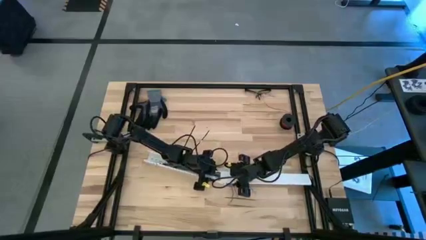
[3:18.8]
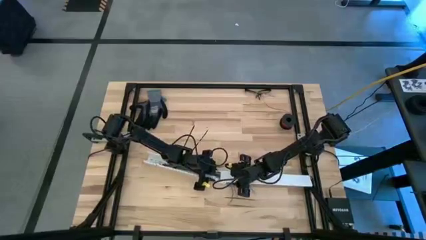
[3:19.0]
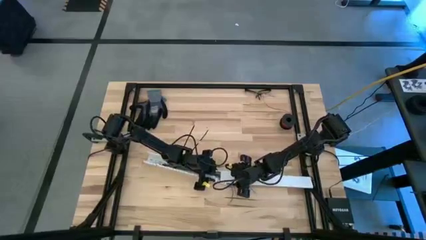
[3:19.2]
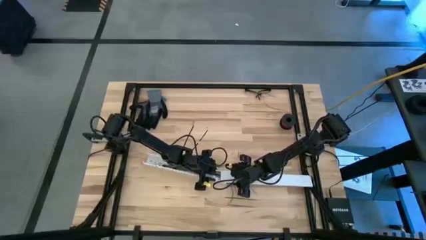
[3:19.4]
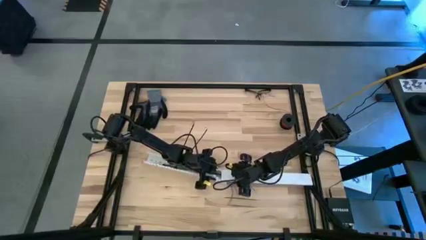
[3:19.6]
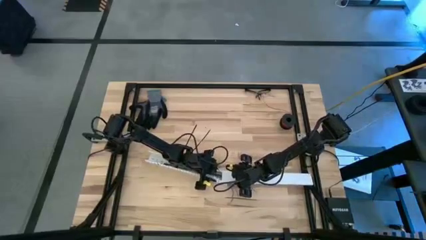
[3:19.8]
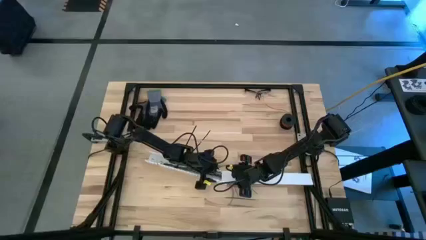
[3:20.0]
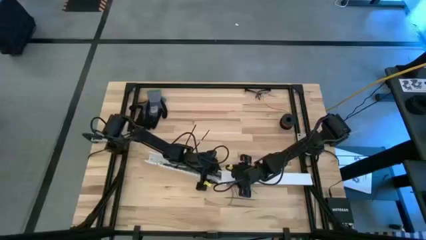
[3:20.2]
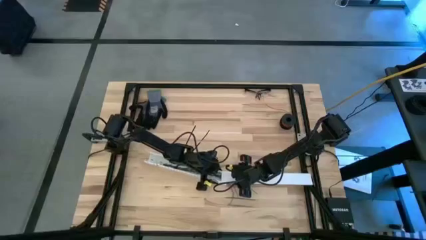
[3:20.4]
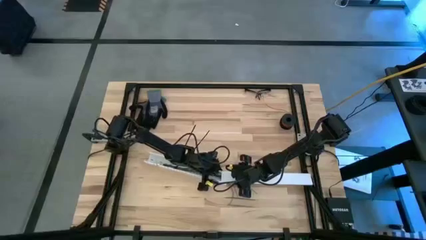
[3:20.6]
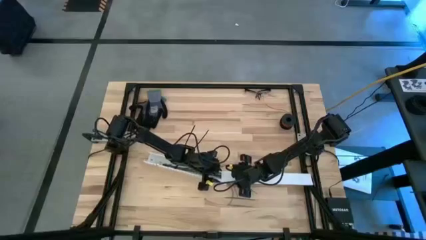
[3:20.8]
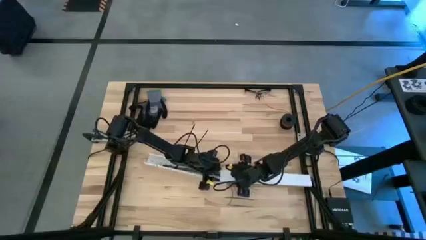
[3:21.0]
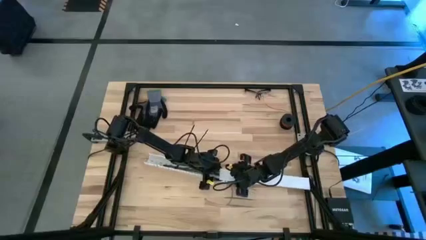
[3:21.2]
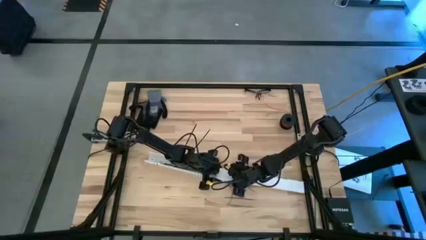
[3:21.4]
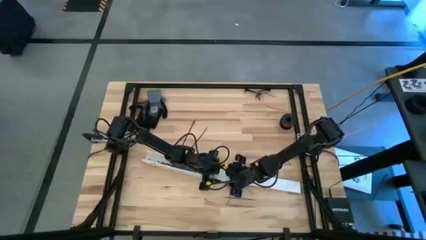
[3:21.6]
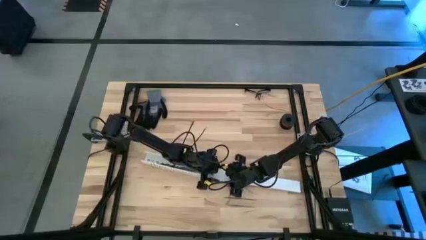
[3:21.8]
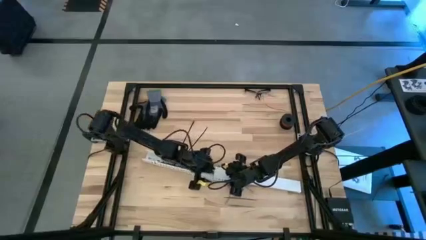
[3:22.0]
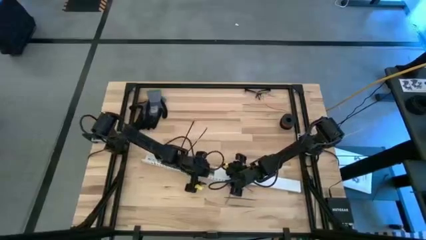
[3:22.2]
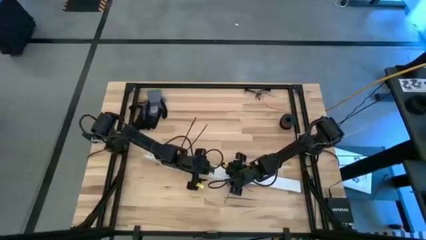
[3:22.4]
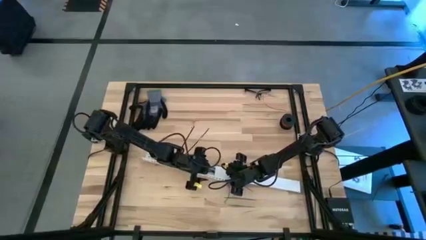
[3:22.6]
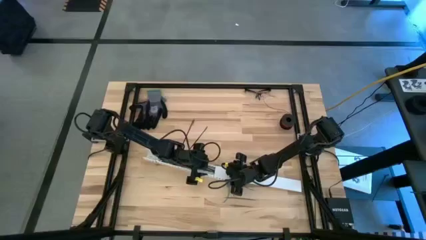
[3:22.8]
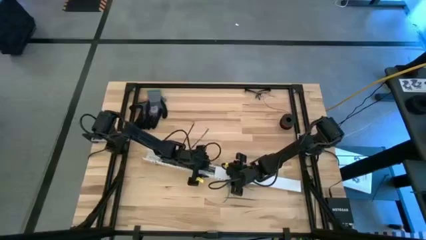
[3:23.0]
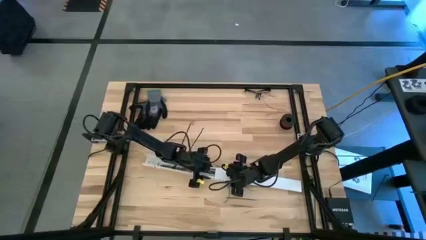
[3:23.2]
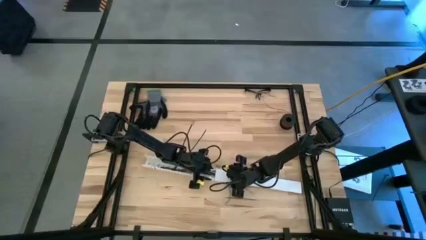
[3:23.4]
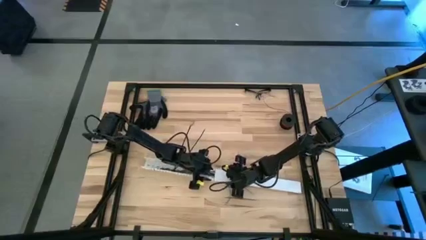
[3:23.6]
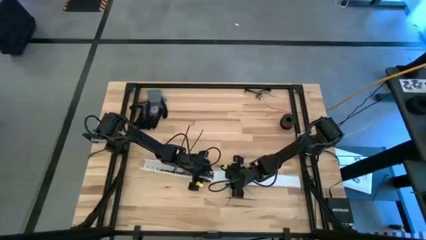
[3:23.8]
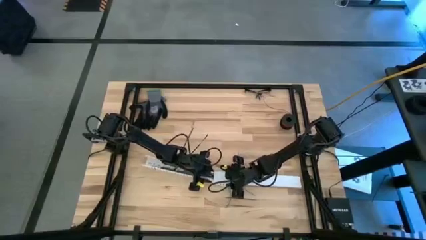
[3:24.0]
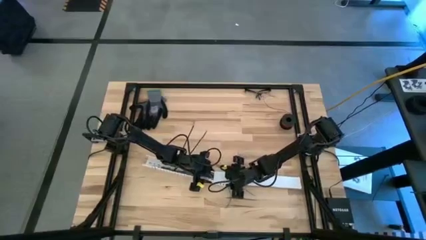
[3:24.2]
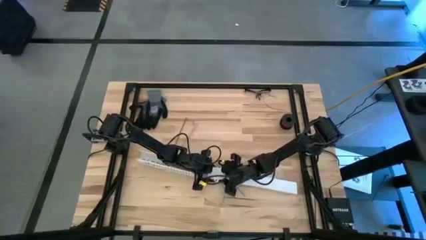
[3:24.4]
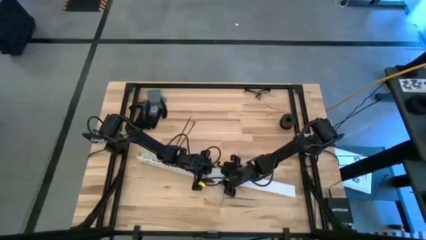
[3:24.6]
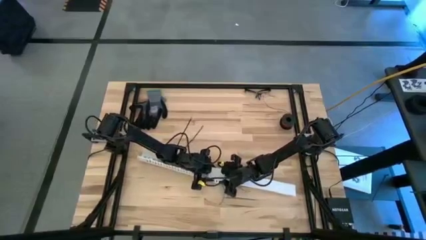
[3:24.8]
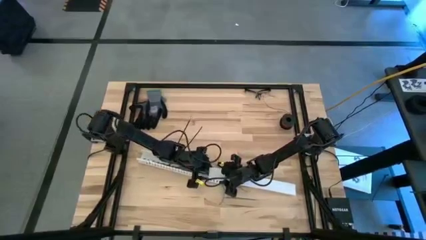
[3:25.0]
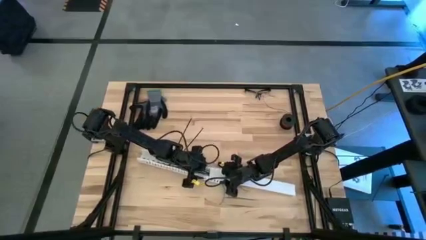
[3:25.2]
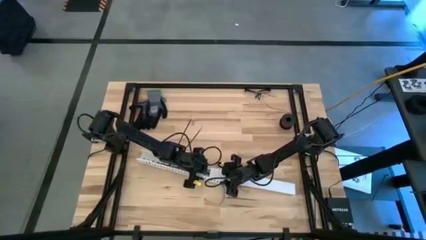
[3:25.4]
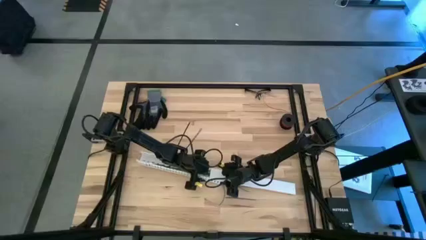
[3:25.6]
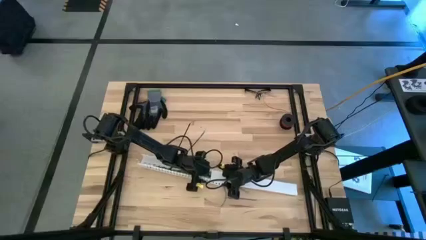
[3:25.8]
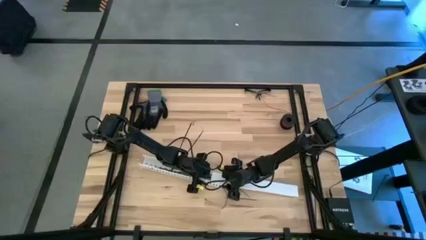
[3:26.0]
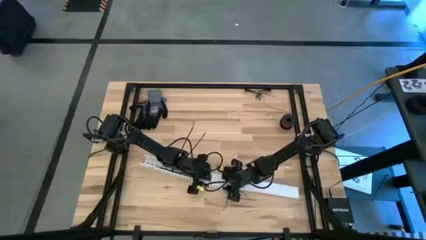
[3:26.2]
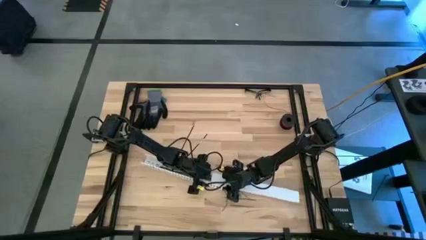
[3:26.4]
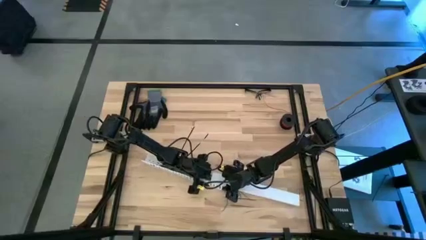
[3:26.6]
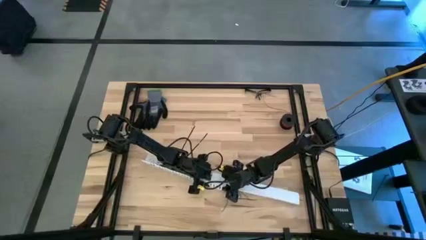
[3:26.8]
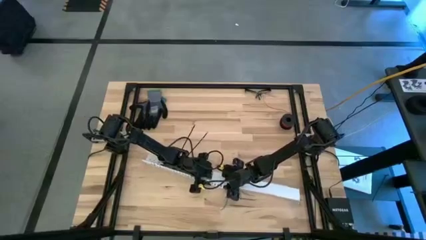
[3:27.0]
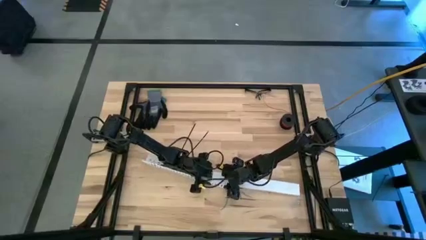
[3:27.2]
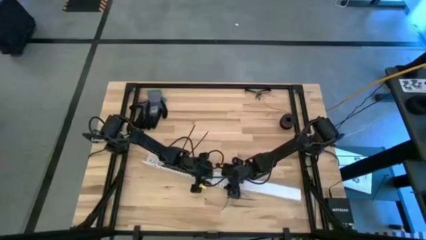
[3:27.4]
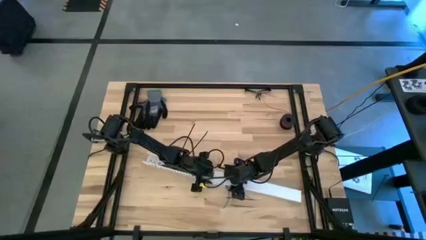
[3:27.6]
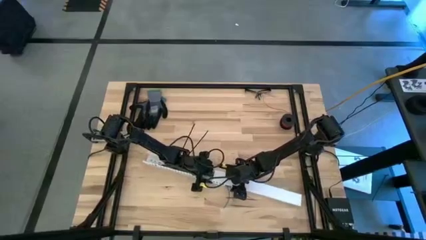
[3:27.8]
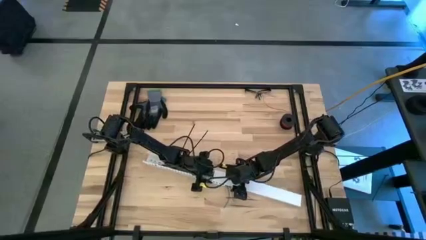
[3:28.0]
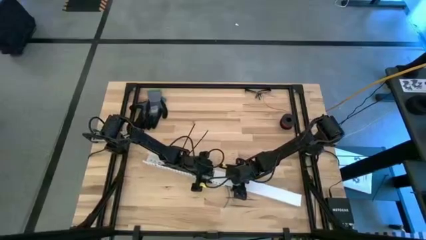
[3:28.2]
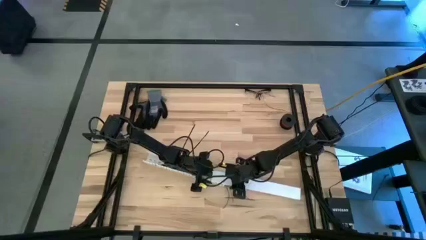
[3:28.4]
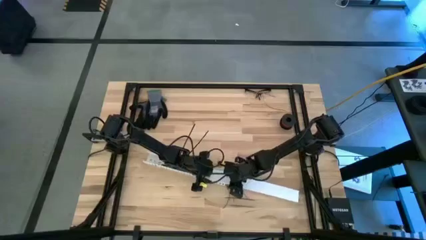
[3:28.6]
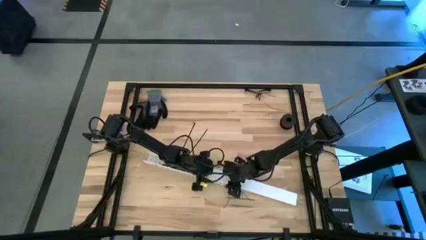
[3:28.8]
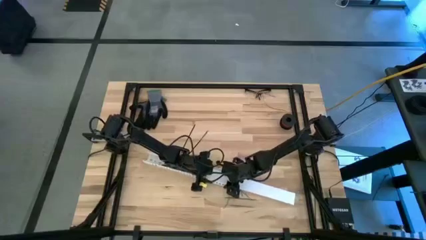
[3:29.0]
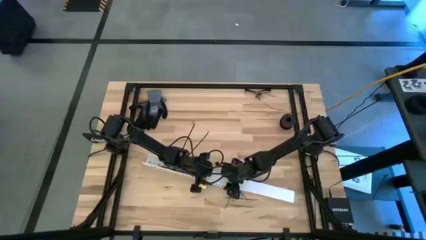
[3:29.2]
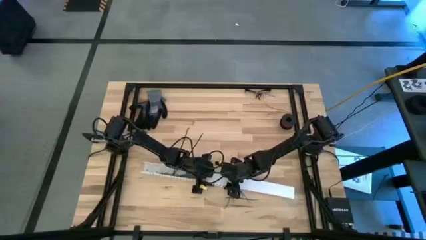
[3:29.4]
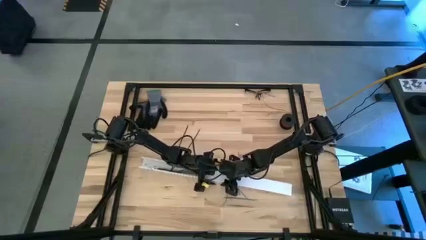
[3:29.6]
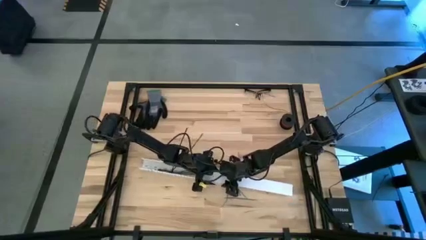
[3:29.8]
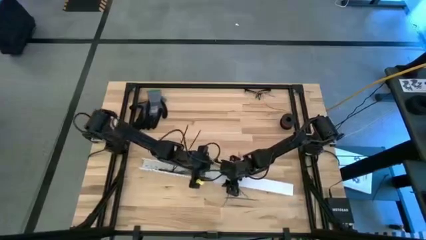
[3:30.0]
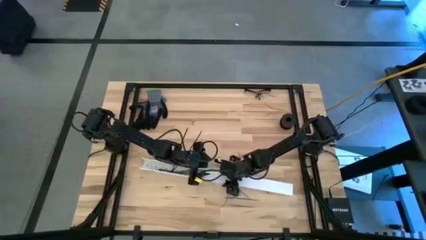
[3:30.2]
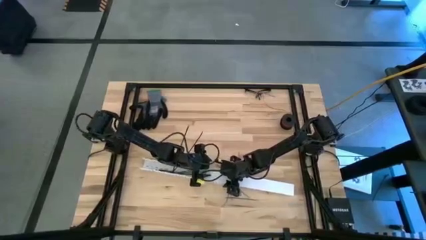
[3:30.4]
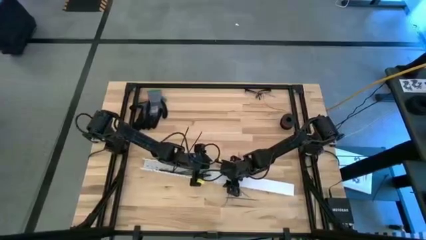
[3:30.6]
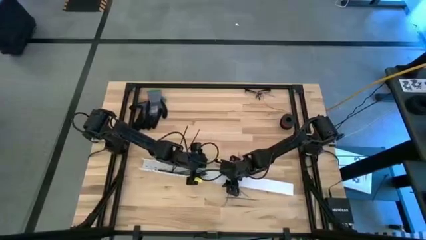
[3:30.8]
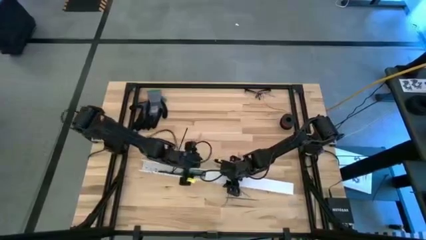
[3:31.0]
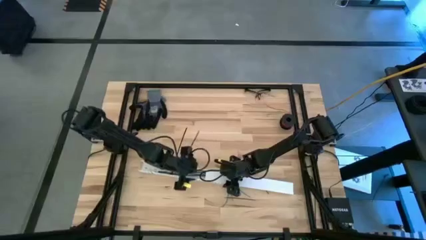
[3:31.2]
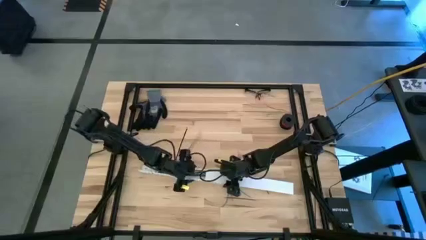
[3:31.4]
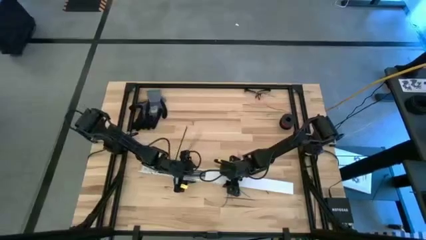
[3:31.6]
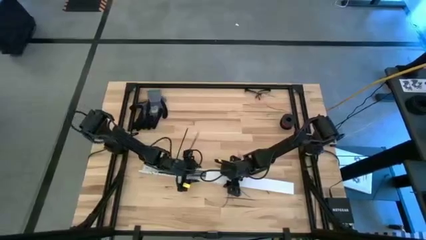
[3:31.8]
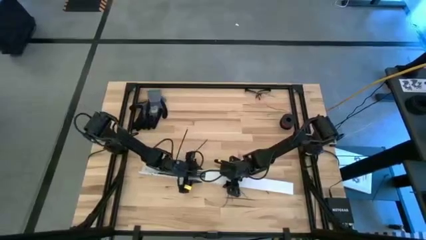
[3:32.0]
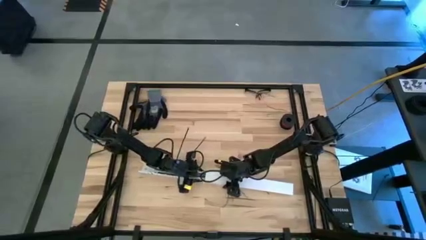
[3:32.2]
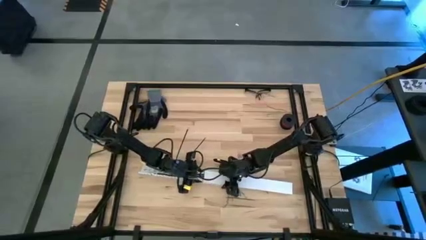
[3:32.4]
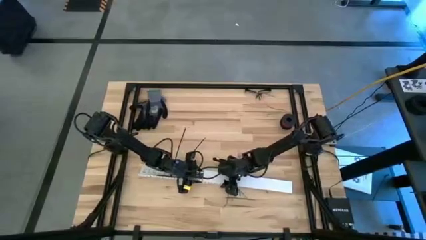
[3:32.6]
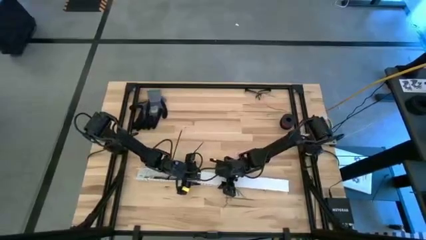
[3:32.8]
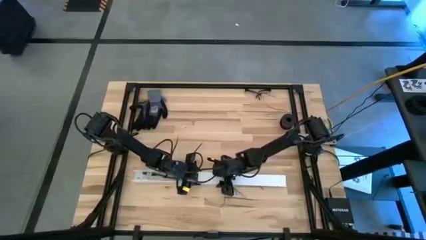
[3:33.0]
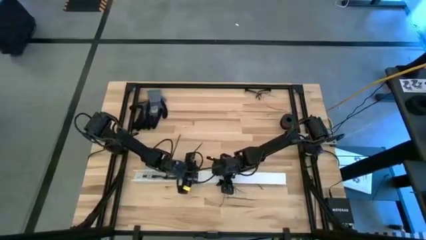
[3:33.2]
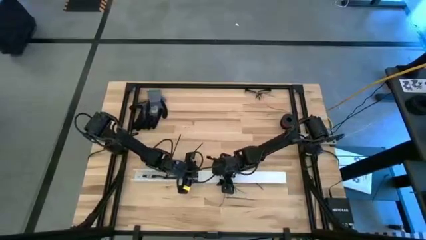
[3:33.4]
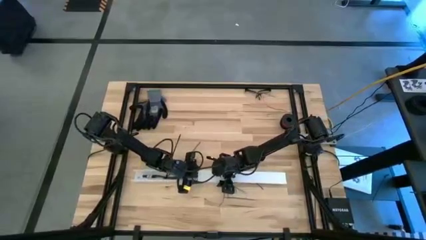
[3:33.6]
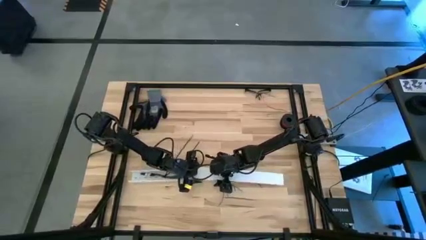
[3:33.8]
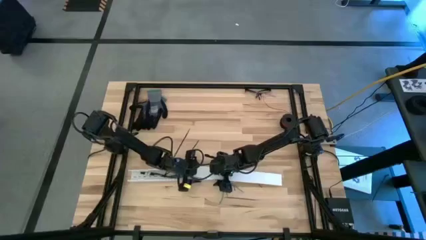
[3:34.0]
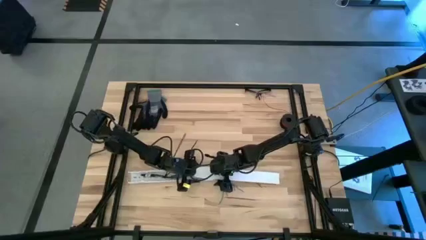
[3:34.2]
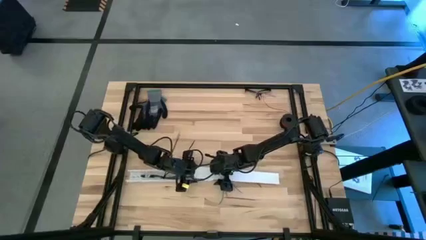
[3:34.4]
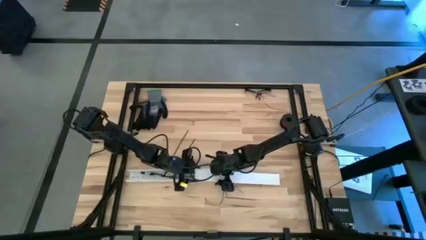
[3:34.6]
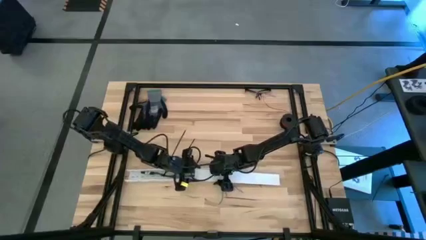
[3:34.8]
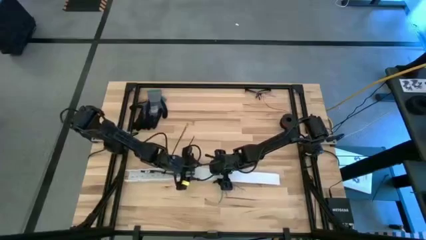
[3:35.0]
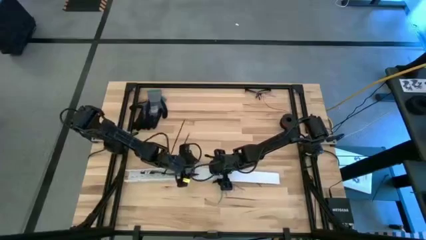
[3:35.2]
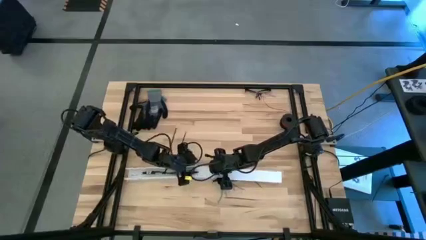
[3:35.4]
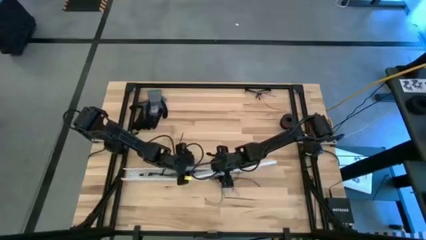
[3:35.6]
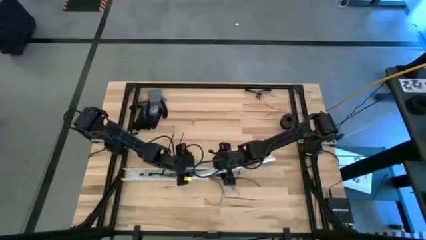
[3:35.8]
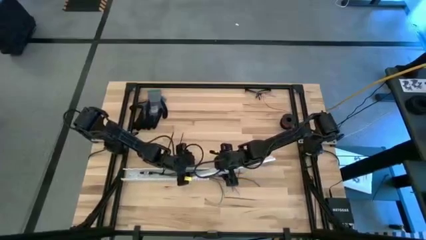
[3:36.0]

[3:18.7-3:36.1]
Task: Ziptie cables
Close the white cable duct
